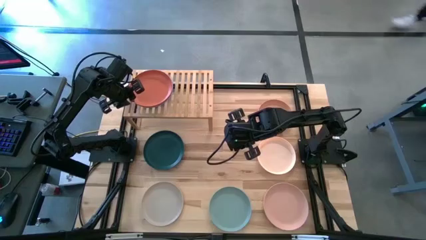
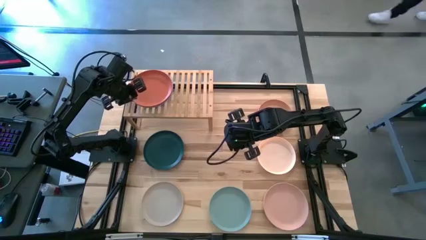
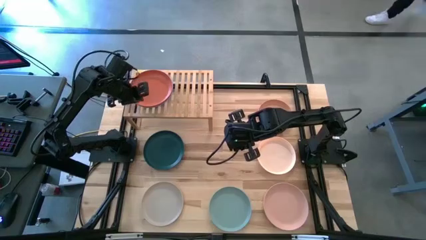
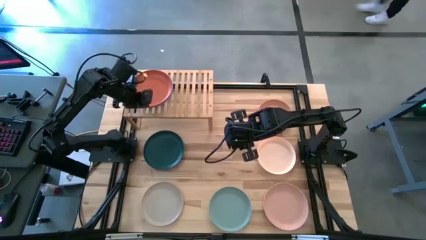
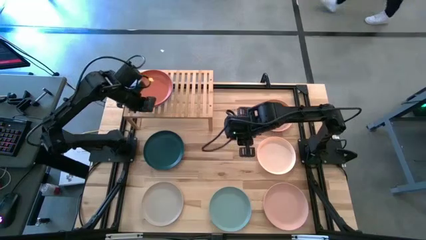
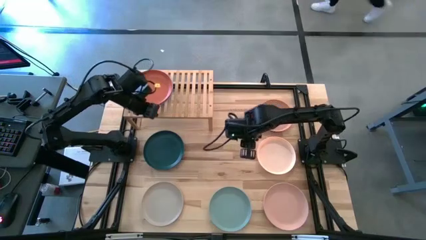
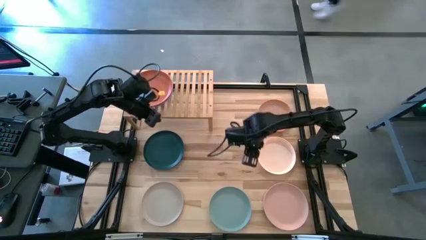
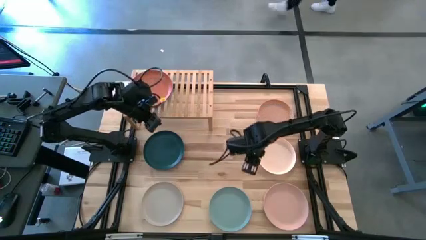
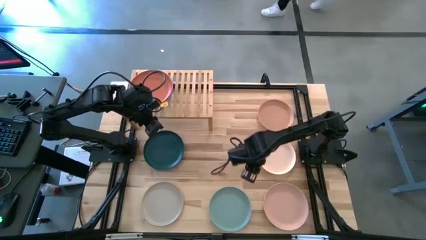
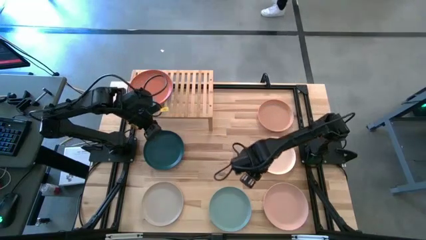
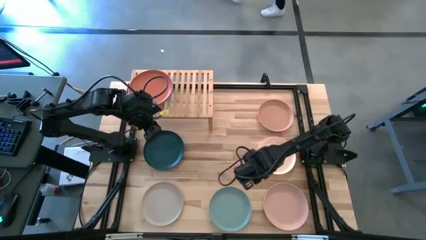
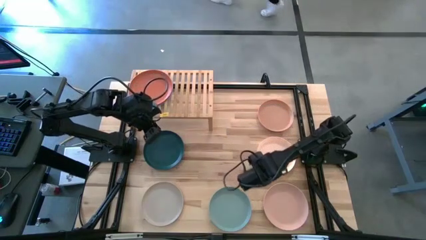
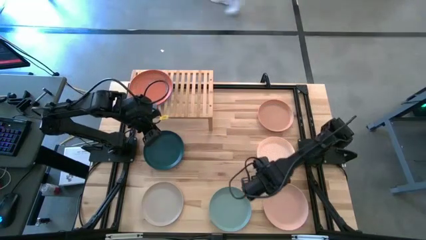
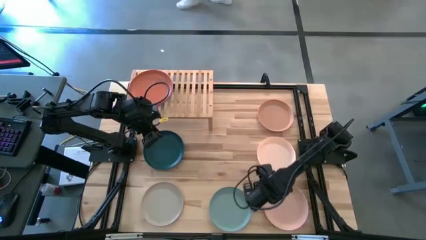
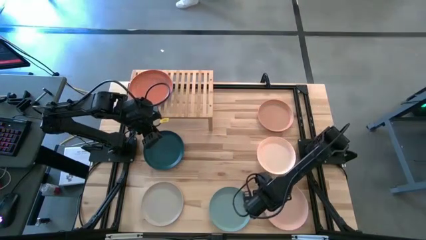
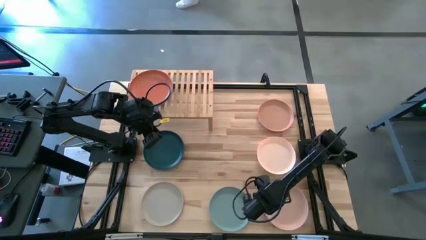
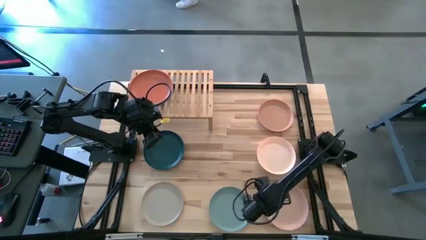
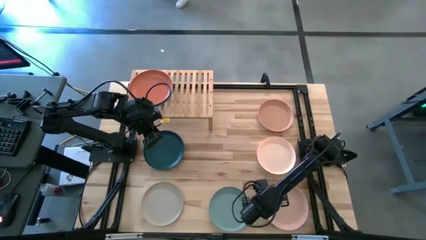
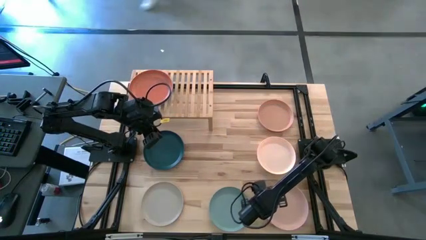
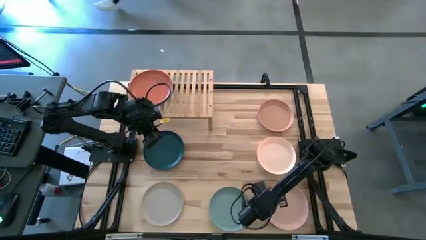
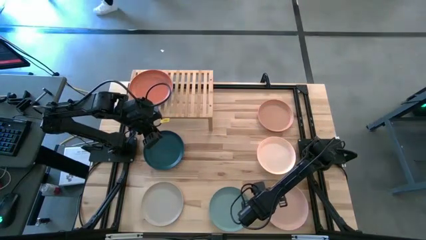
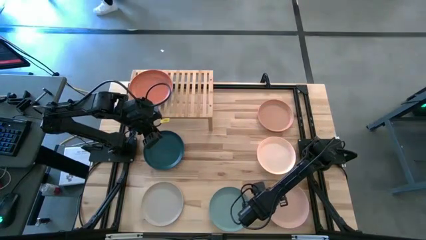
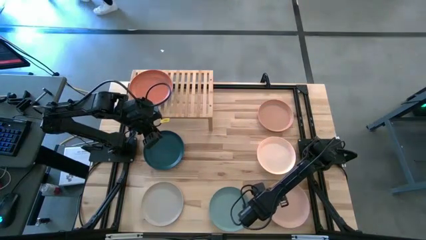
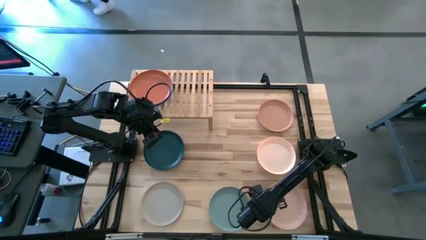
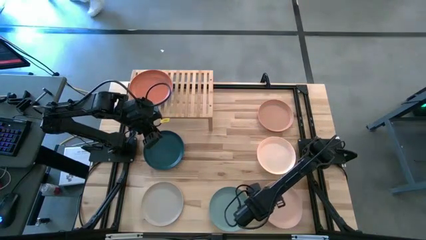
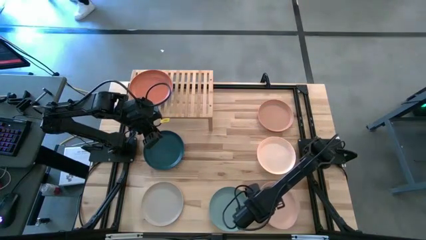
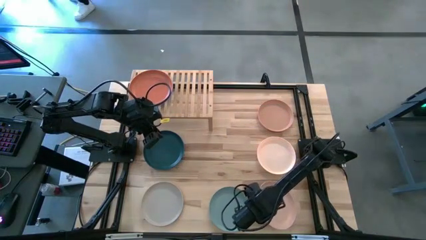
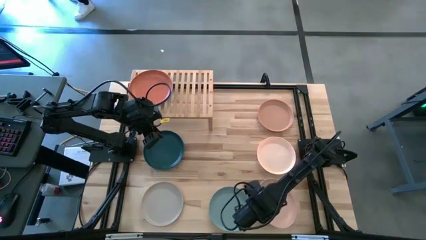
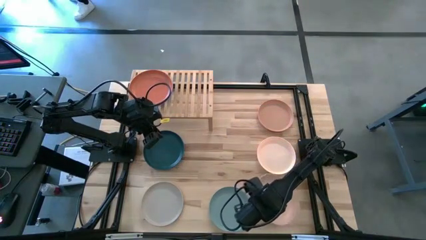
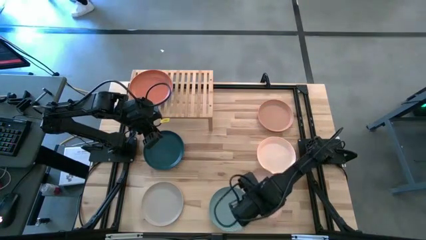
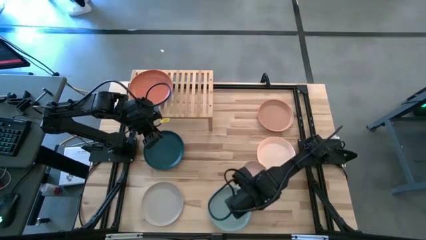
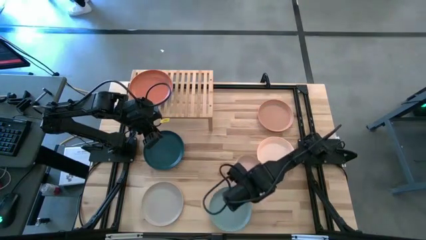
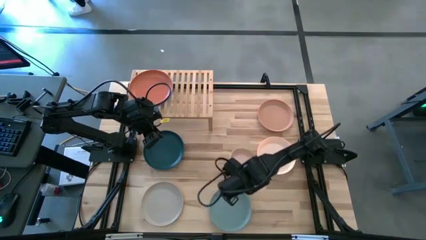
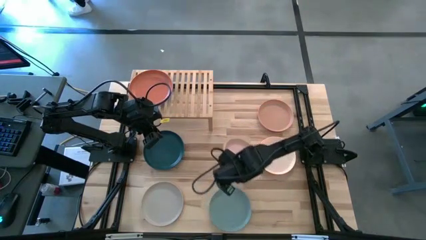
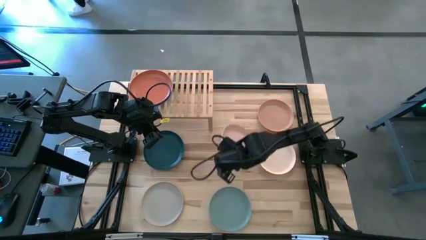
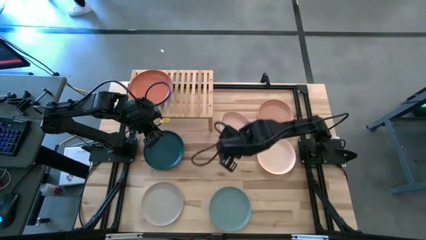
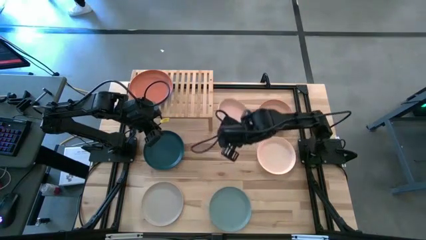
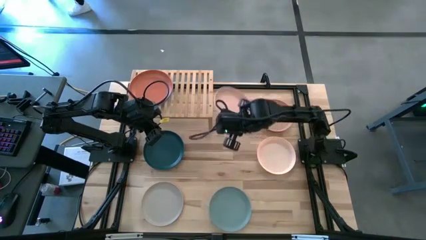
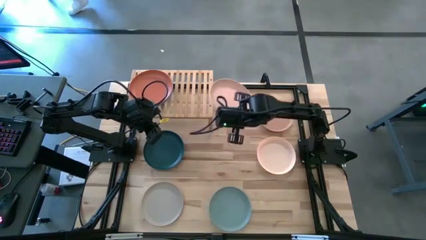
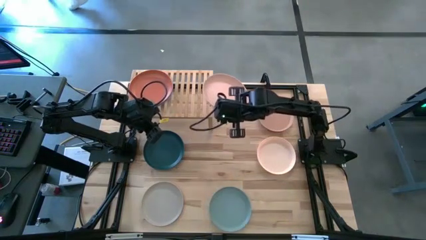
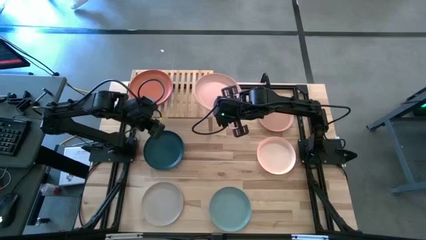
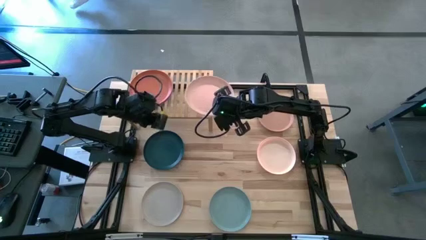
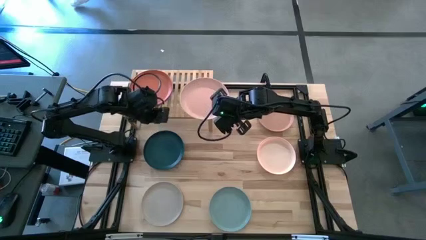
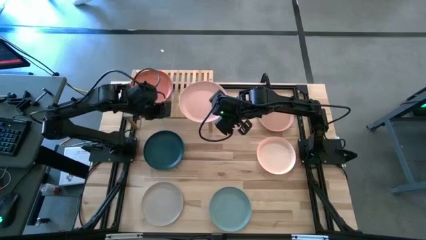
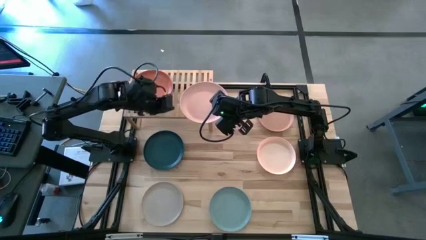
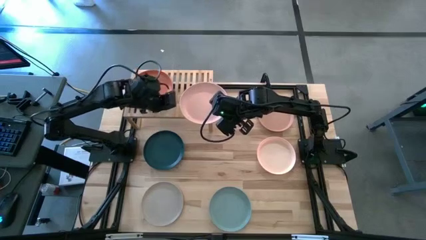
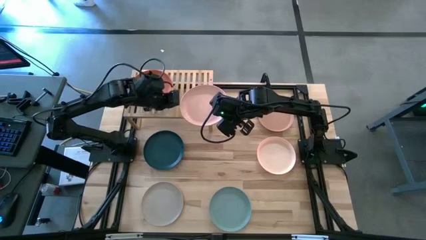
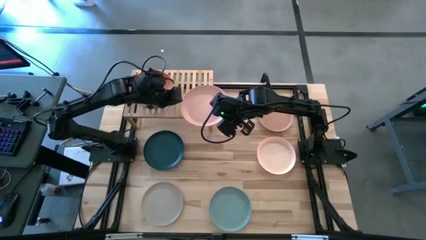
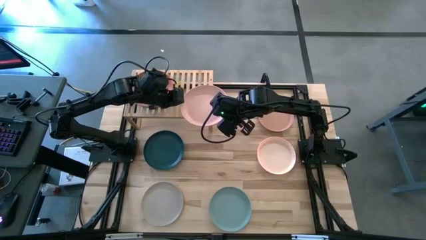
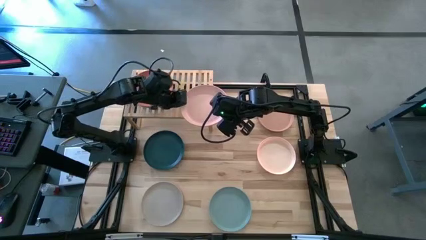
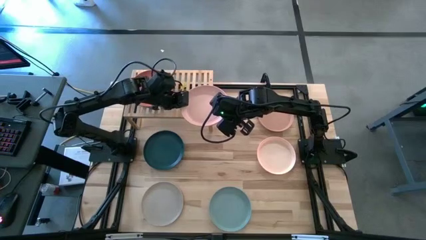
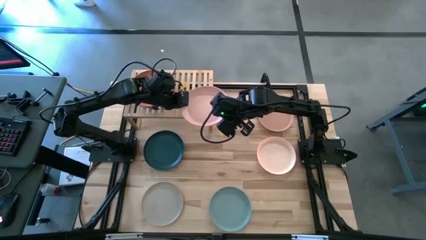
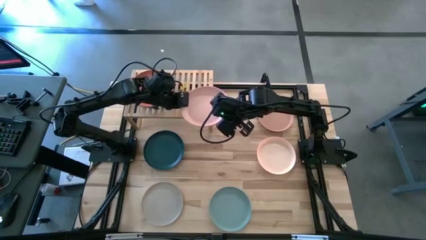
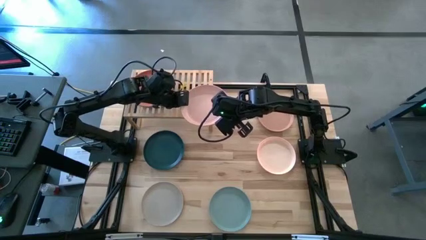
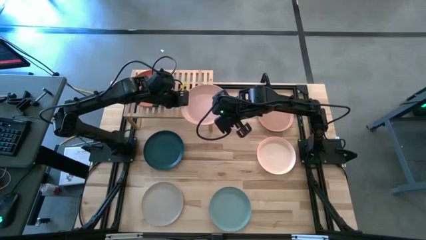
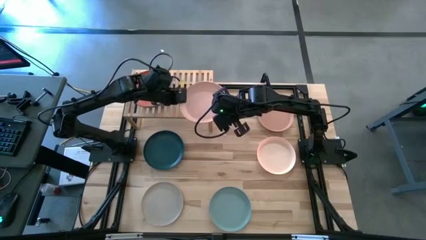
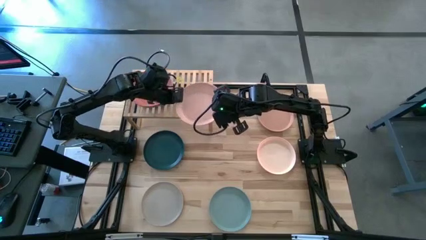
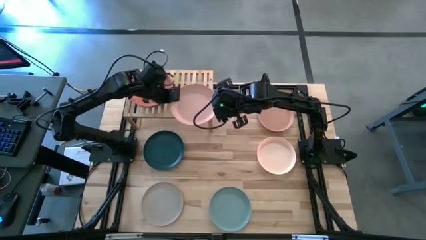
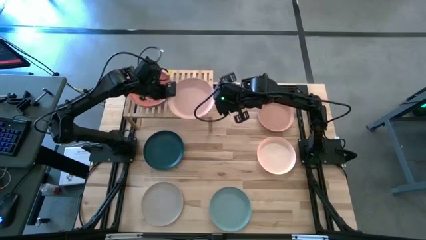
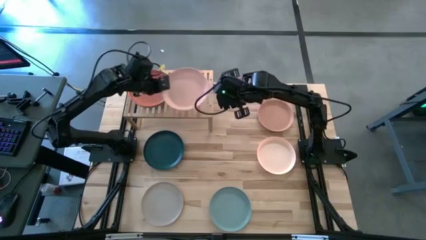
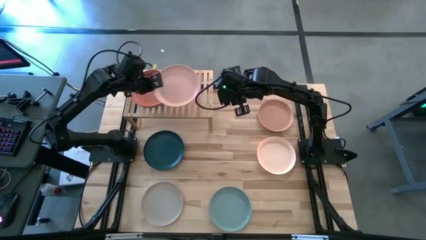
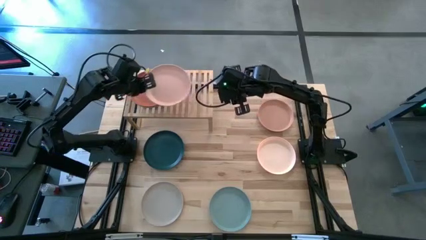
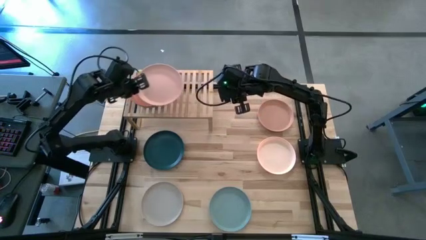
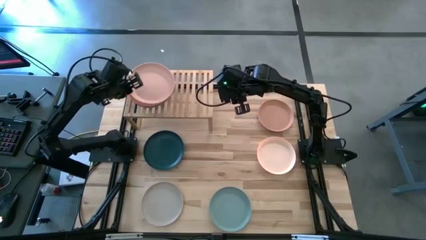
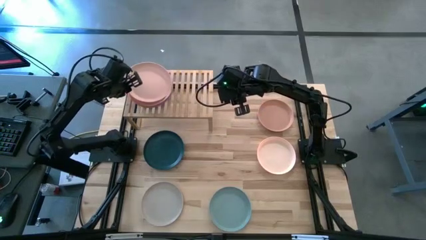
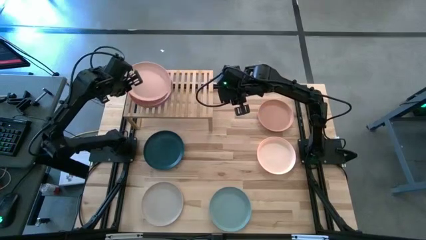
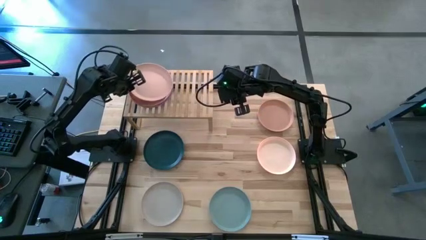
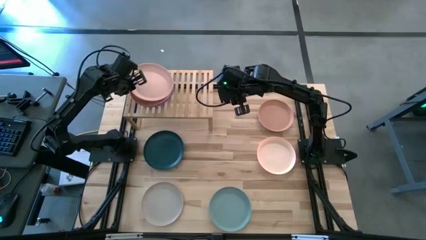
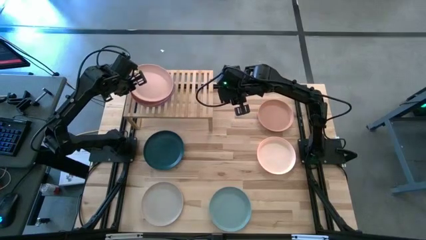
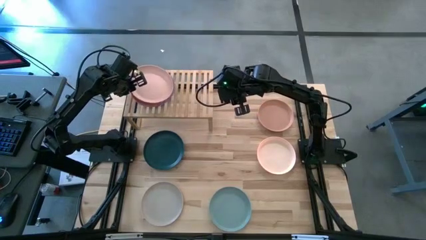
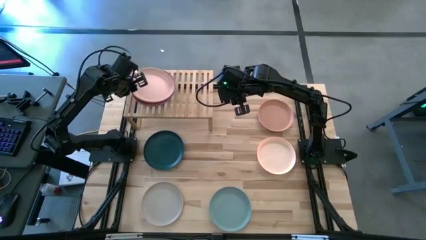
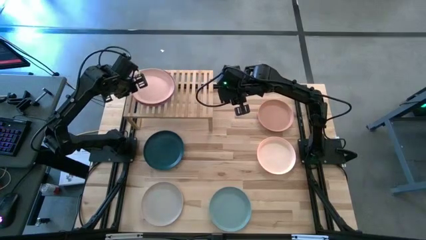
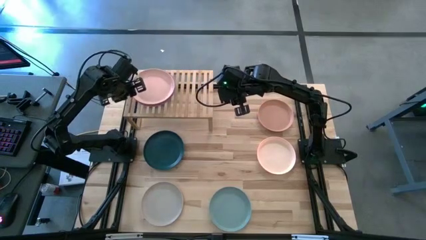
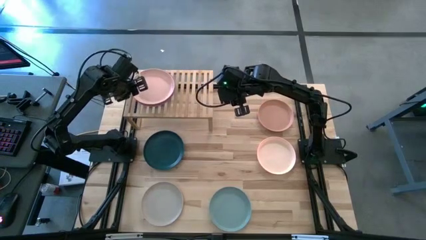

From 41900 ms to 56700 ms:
Task: Place and stack plates onto a shelf
Stack the light pink plate on the top of the orange plate
